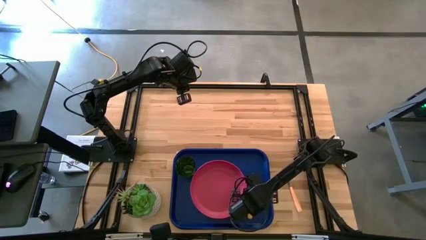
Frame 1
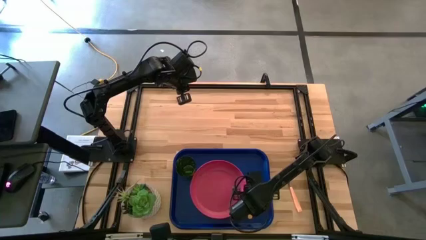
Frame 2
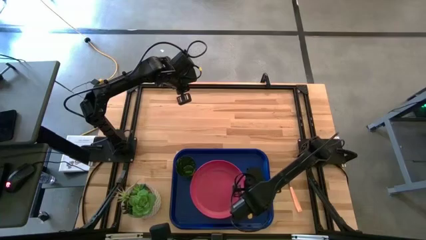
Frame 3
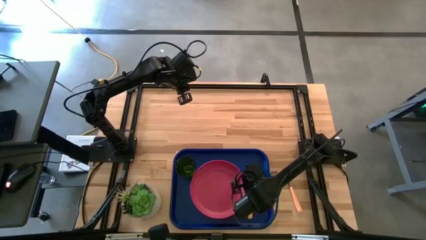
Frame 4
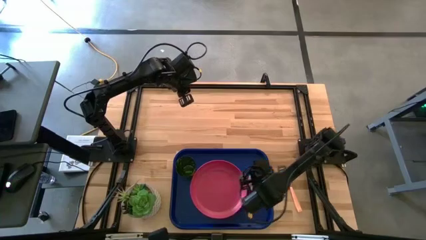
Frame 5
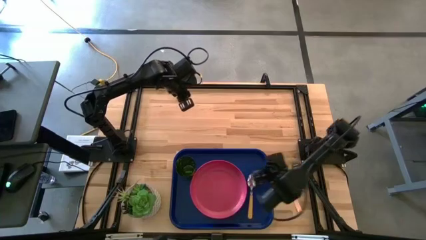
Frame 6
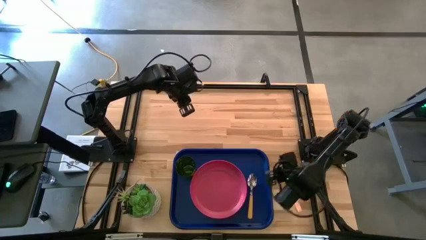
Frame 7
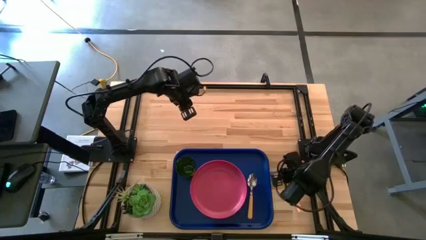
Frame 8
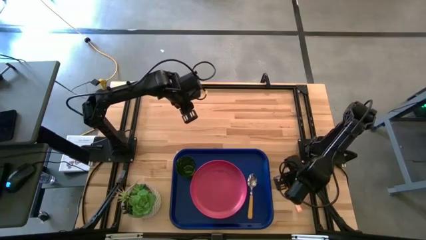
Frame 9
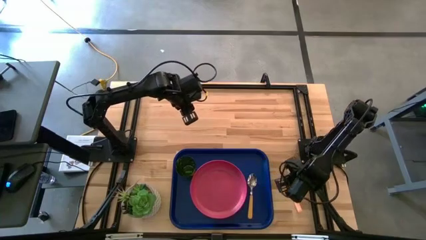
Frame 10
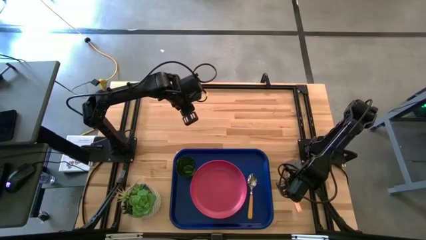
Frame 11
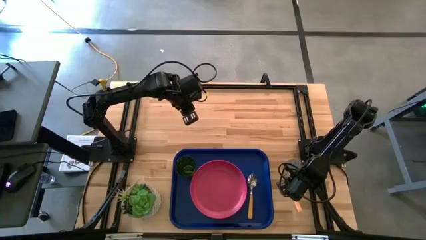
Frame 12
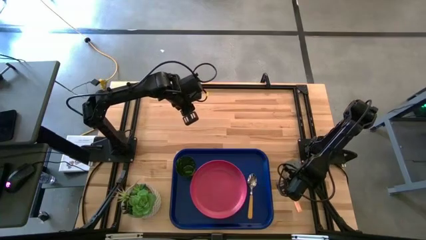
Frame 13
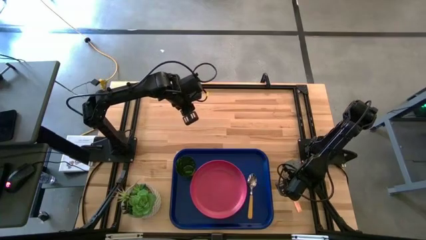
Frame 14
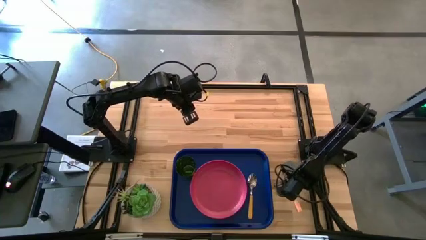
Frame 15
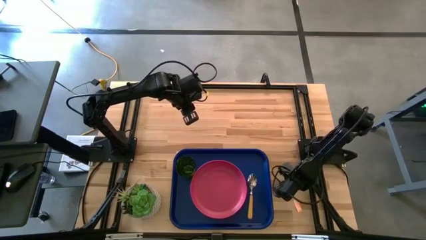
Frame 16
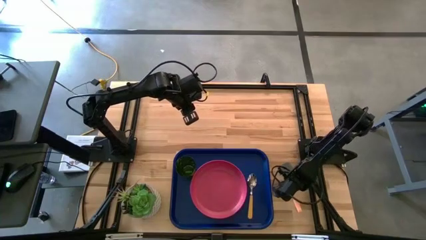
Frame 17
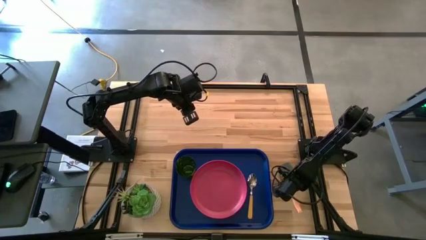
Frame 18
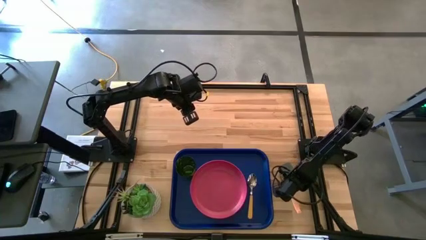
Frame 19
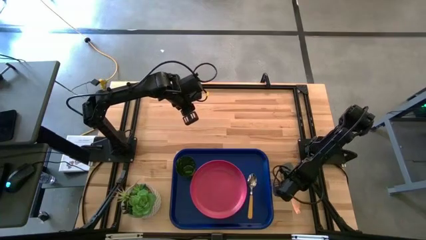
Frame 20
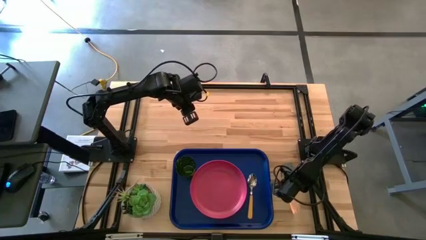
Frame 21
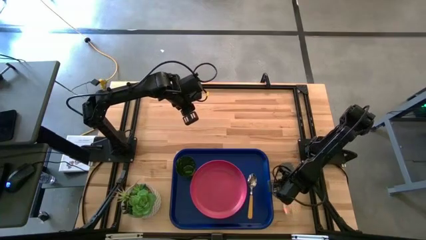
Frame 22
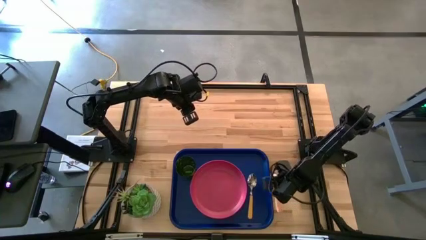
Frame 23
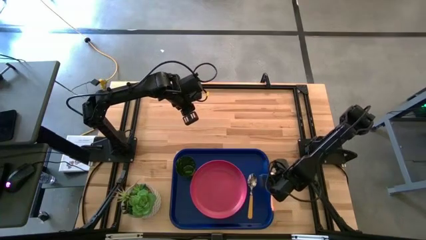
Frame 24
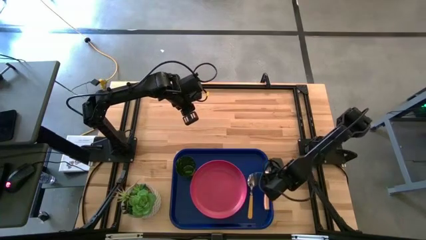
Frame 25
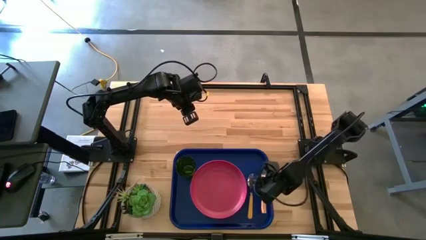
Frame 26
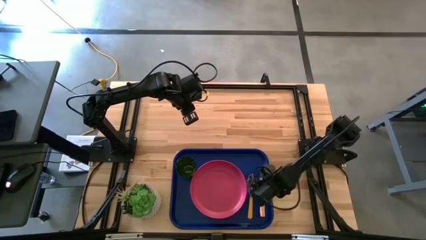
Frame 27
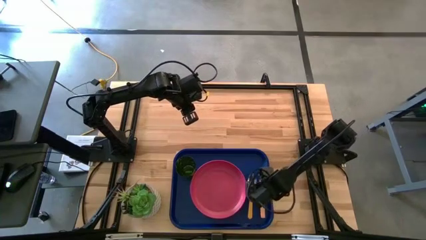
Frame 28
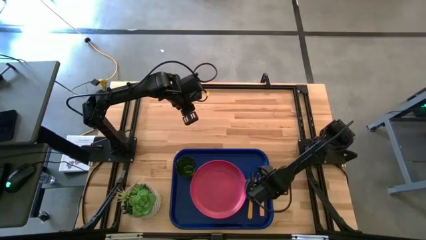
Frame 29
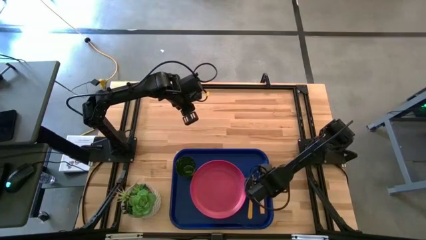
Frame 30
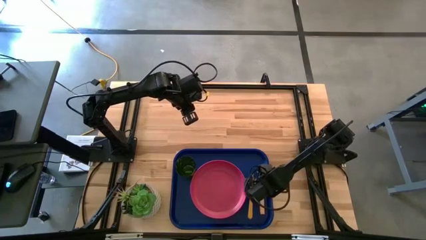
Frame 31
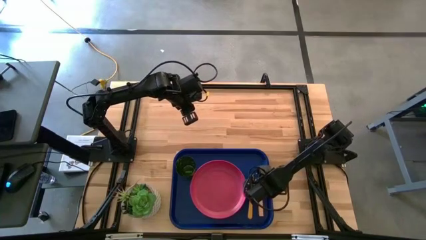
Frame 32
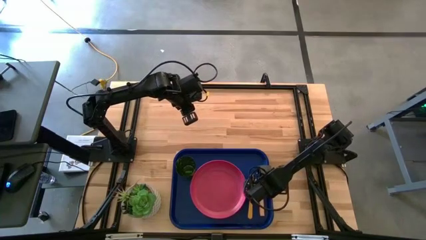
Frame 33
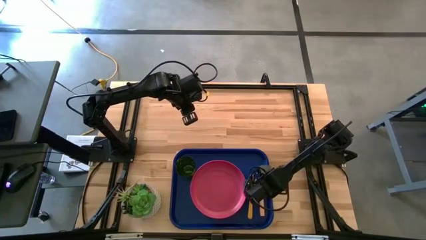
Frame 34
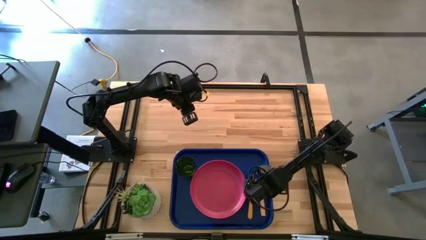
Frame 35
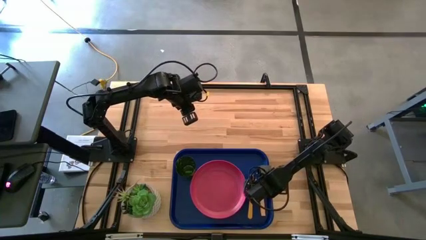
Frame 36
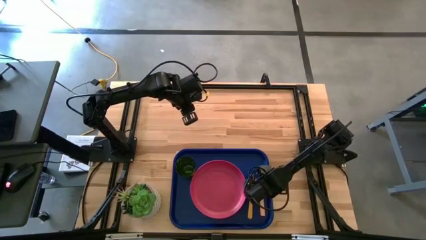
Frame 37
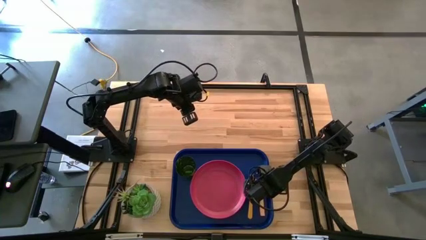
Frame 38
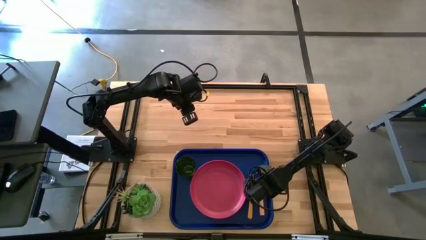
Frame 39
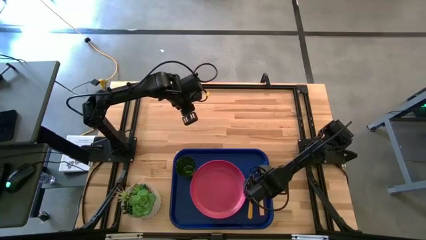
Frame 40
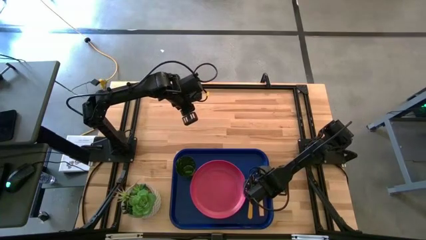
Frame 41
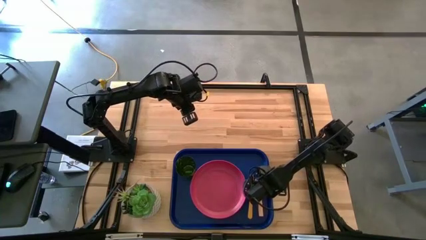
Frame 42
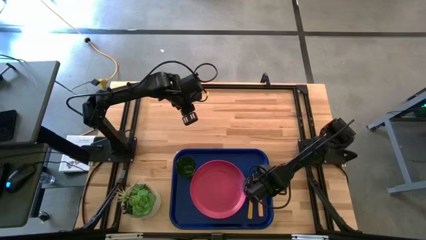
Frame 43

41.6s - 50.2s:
Task: Pick and place plate/cup/fork/spoon on tray
Put the orange fork on the blue serving tray to the right side of the yellow spoon

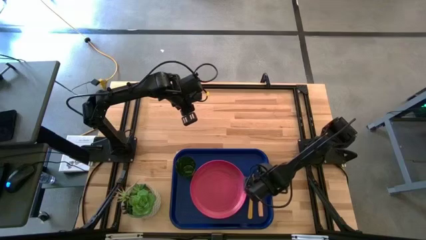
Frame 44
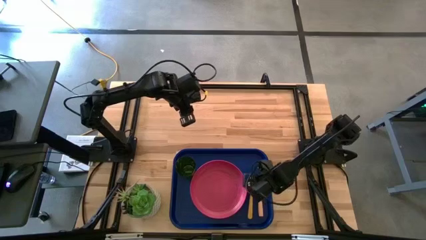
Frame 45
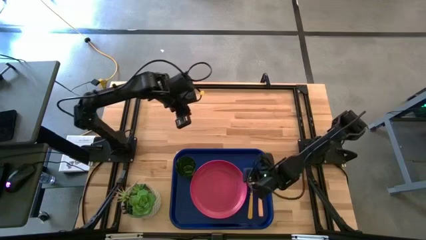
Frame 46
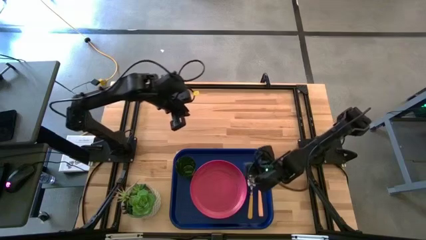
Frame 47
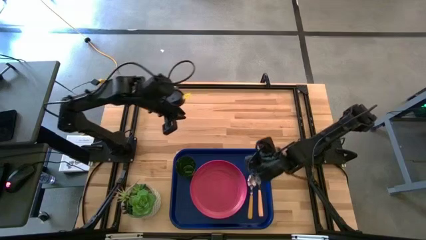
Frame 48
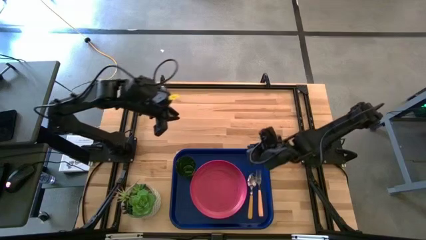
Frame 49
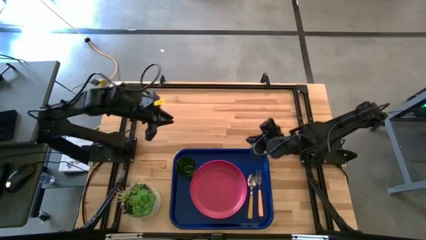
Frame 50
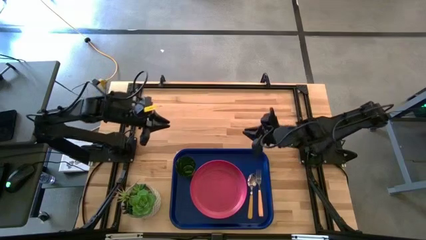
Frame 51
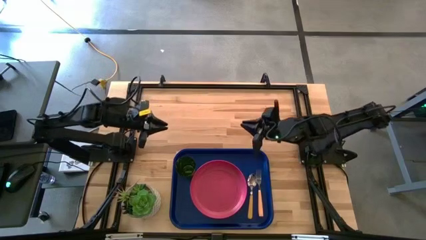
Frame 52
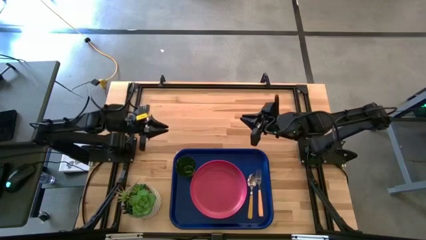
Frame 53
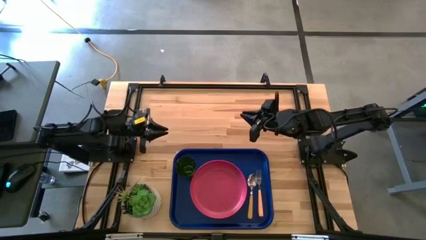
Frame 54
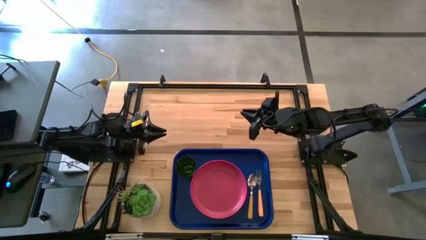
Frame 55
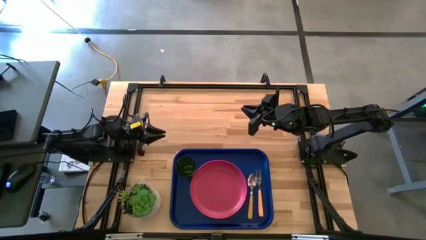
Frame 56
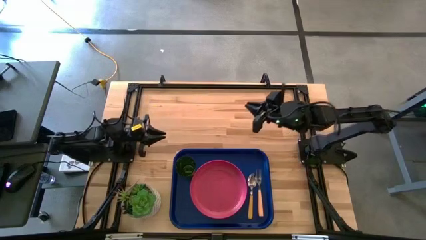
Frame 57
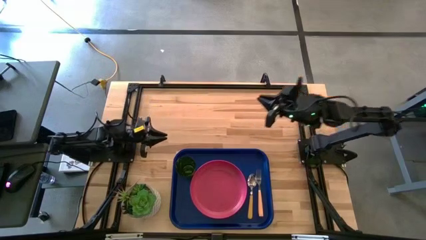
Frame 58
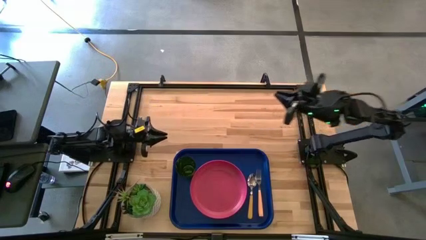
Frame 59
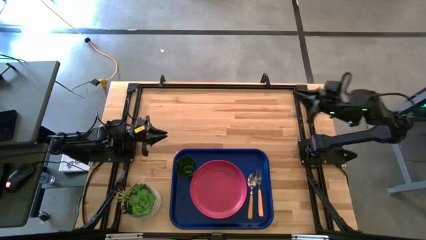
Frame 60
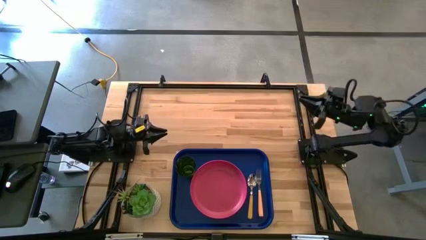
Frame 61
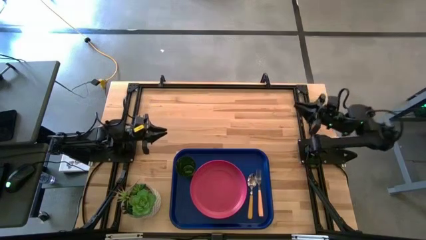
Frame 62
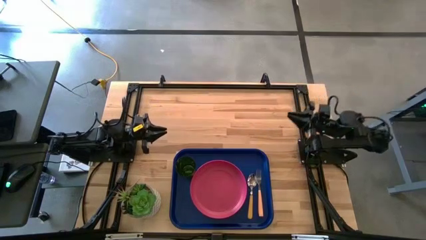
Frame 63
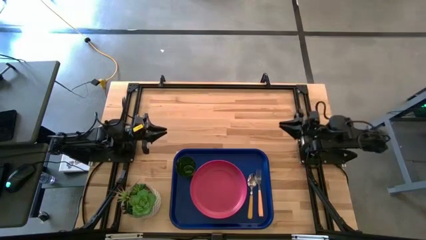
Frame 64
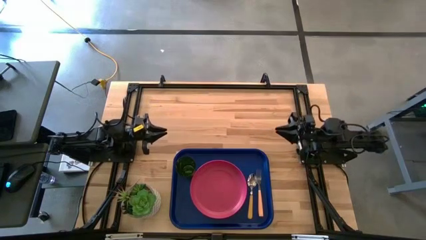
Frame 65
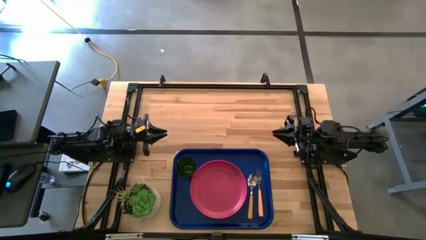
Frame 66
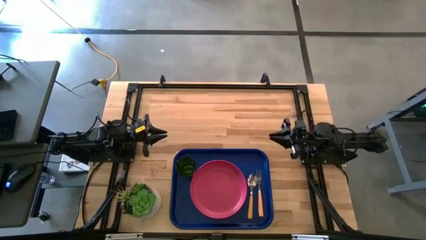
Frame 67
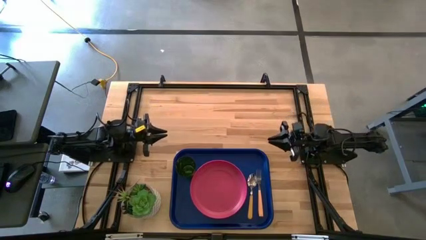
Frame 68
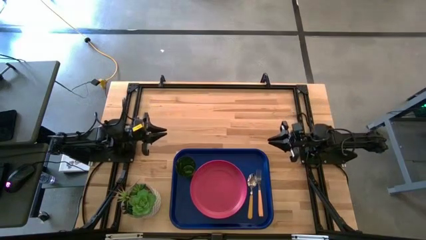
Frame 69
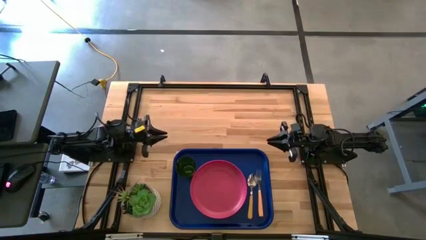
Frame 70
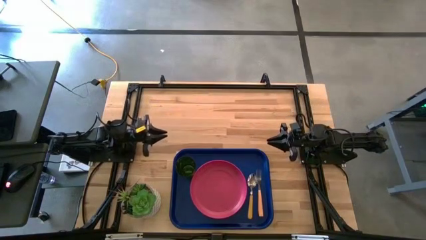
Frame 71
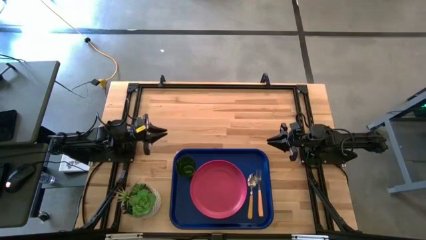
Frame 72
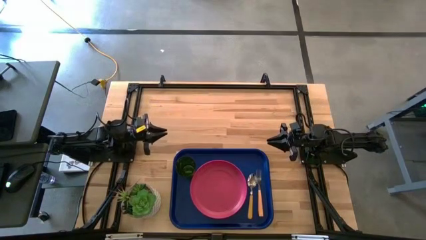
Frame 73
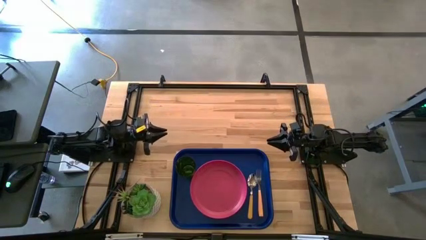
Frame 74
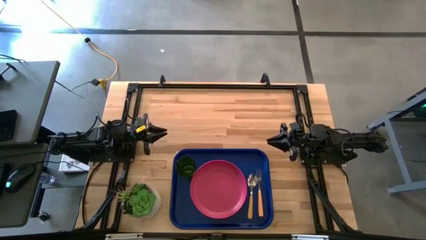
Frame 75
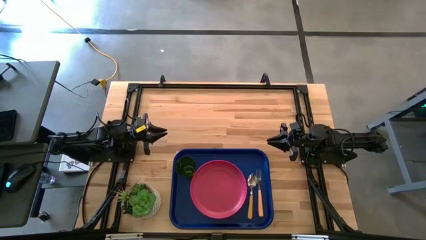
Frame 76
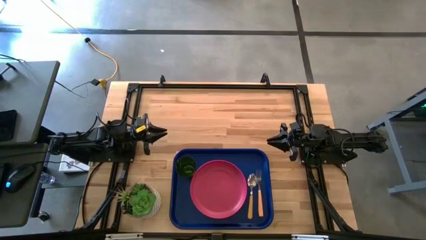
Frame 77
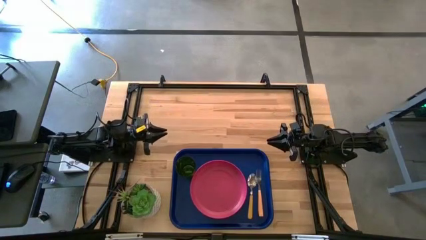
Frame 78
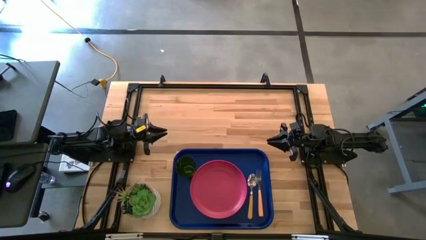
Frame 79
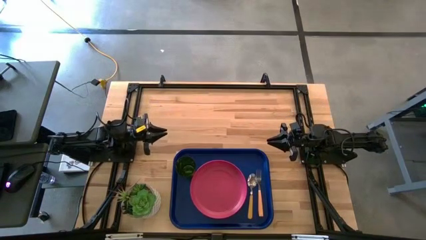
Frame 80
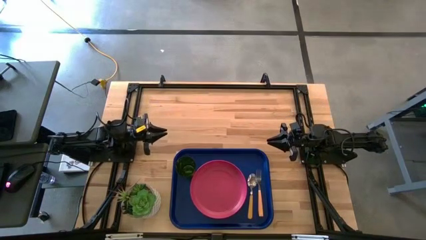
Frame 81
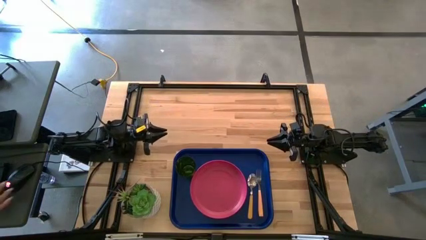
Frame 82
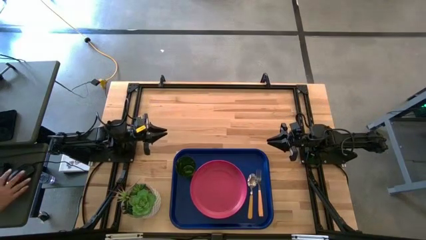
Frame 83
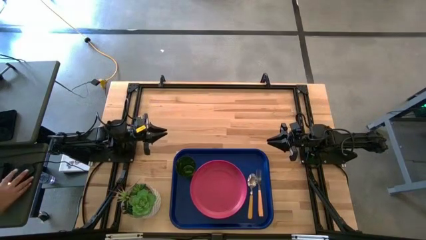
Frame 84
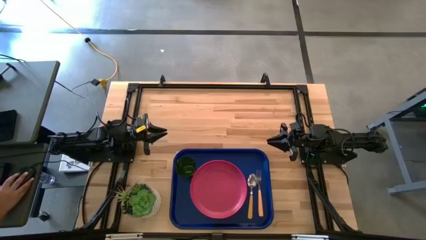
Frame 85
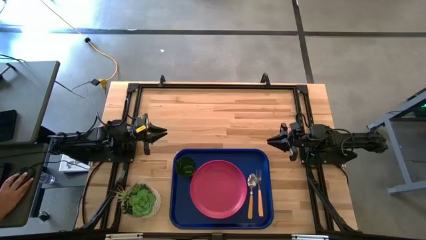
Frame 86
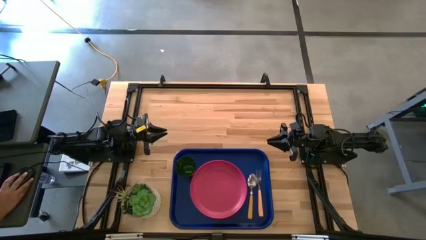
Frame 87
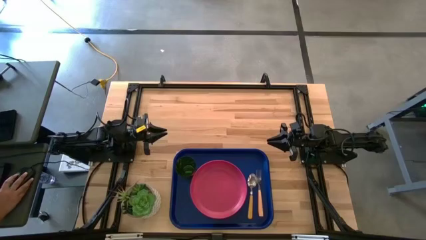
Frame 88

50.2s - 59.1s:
Return to Home Position
